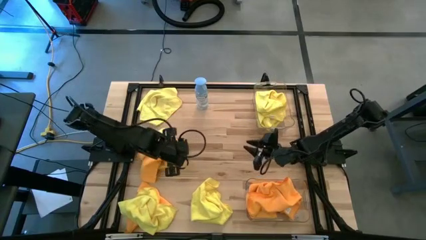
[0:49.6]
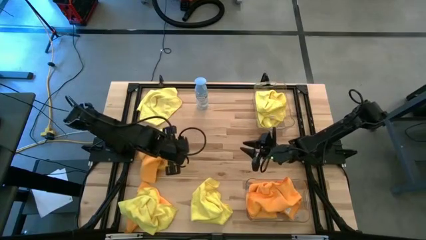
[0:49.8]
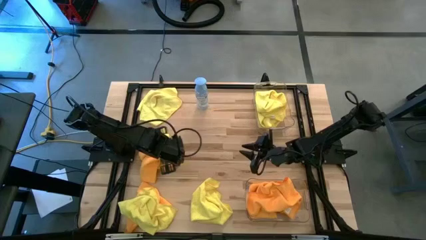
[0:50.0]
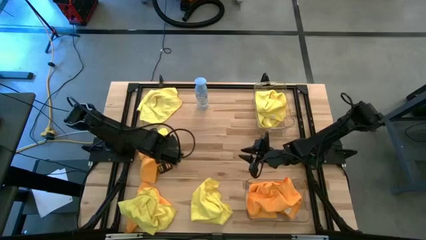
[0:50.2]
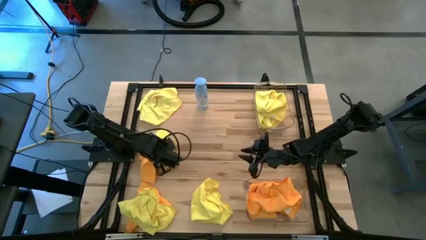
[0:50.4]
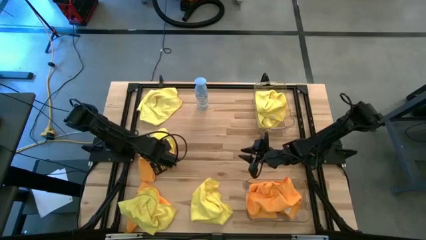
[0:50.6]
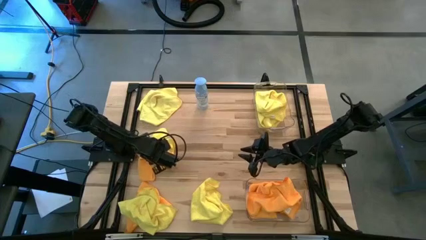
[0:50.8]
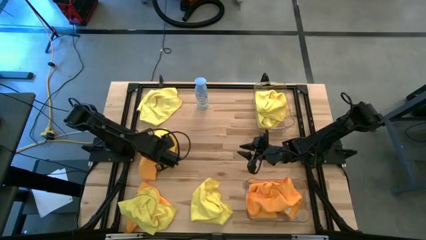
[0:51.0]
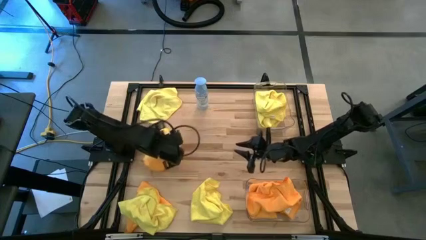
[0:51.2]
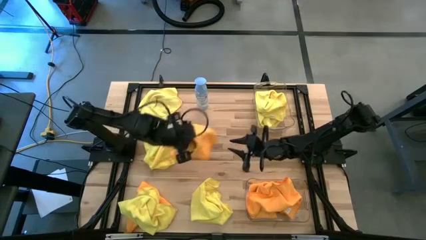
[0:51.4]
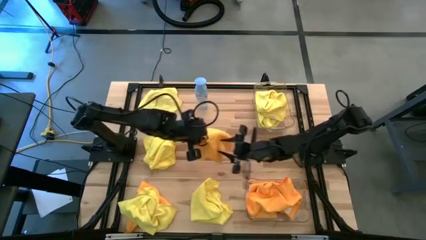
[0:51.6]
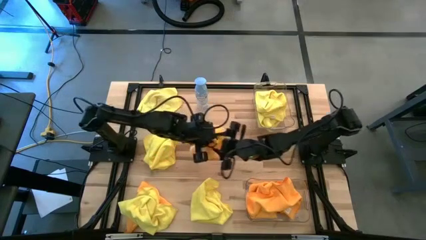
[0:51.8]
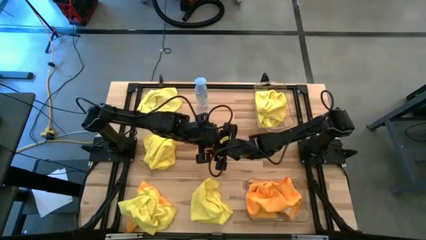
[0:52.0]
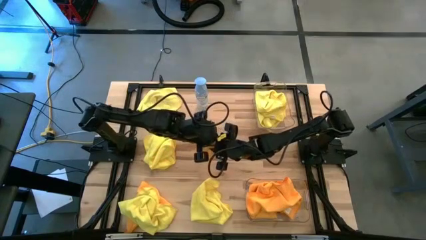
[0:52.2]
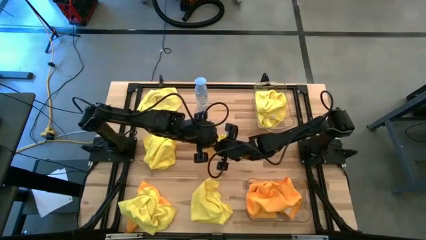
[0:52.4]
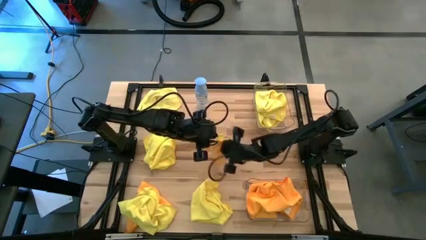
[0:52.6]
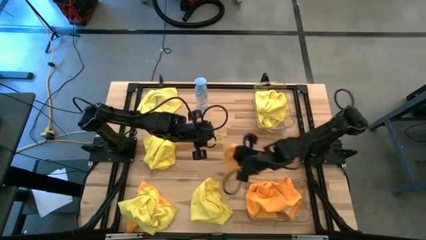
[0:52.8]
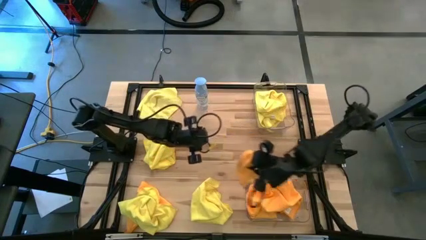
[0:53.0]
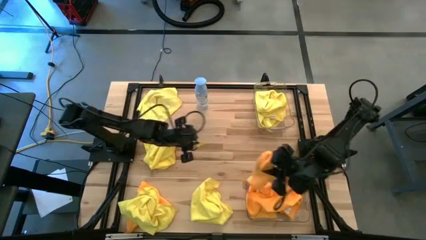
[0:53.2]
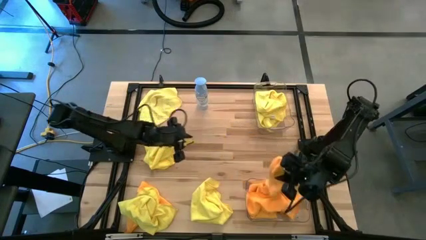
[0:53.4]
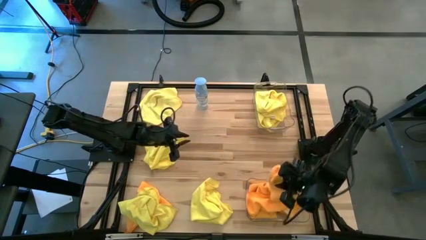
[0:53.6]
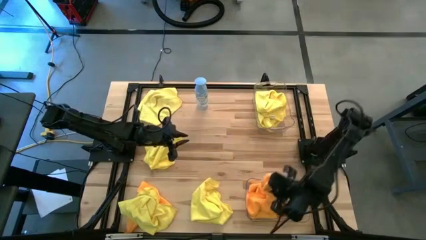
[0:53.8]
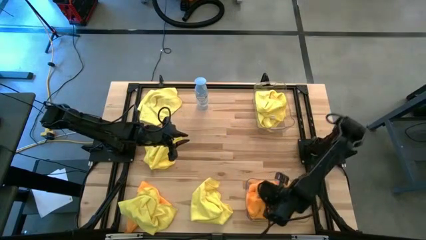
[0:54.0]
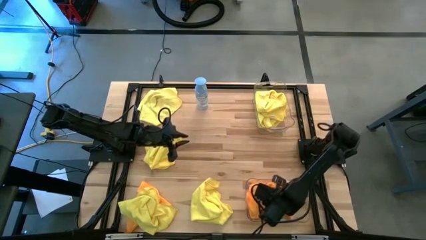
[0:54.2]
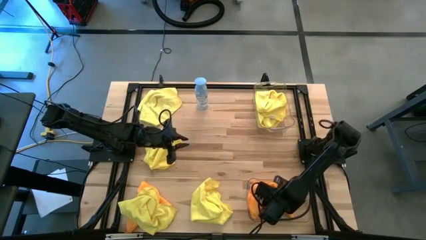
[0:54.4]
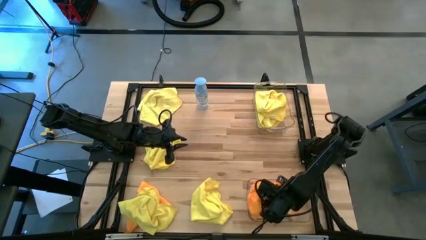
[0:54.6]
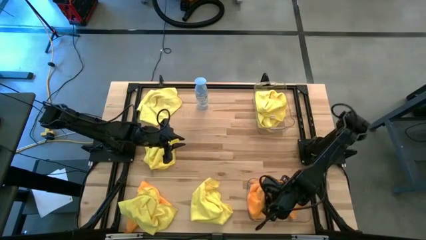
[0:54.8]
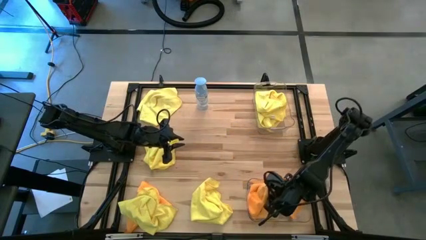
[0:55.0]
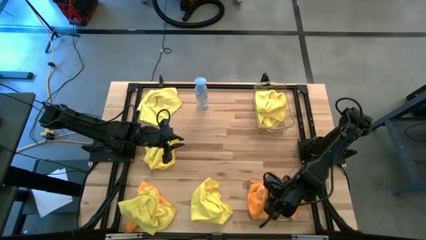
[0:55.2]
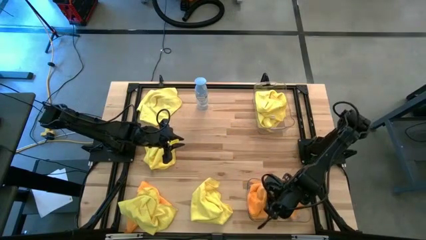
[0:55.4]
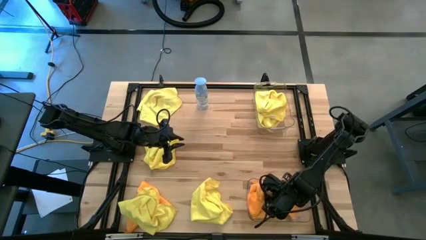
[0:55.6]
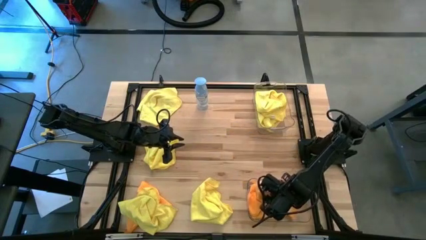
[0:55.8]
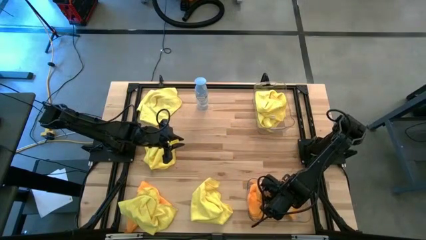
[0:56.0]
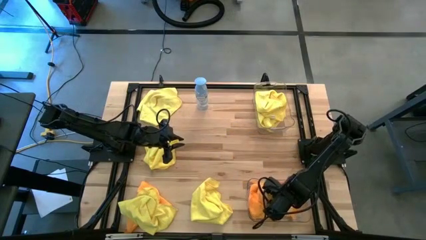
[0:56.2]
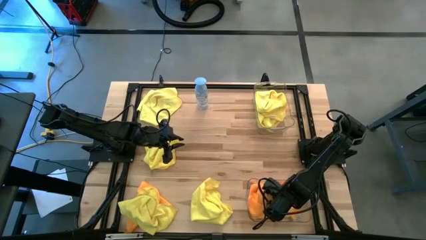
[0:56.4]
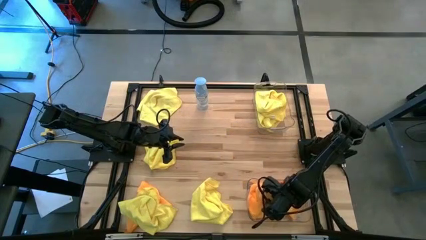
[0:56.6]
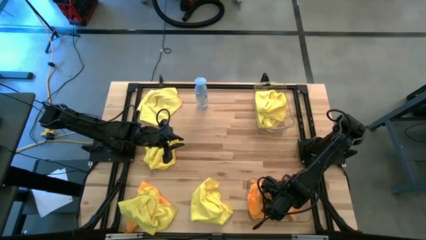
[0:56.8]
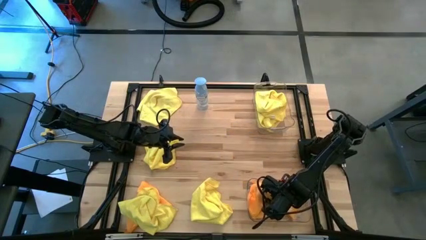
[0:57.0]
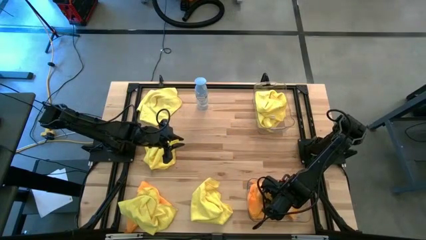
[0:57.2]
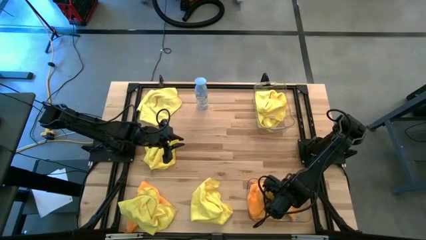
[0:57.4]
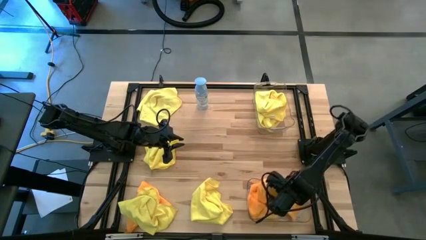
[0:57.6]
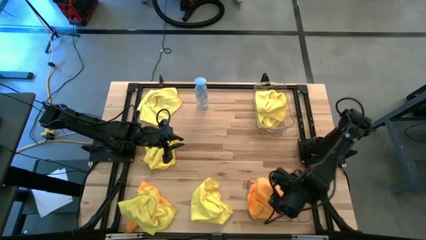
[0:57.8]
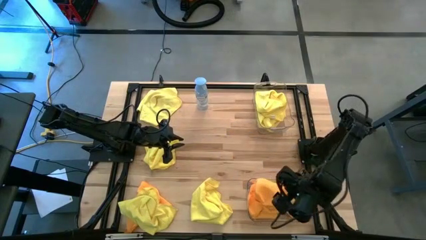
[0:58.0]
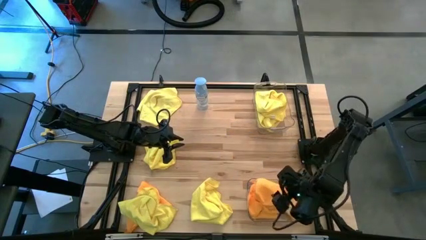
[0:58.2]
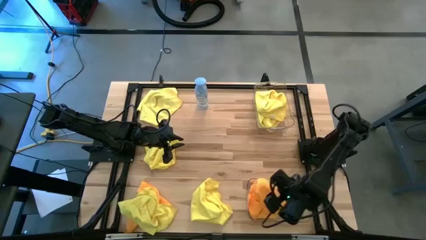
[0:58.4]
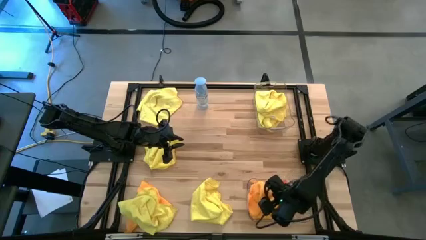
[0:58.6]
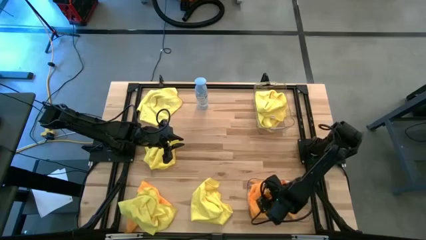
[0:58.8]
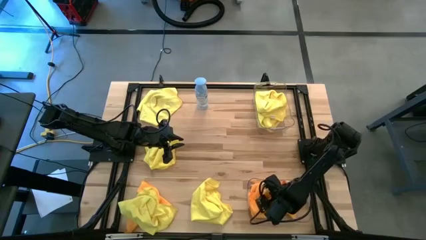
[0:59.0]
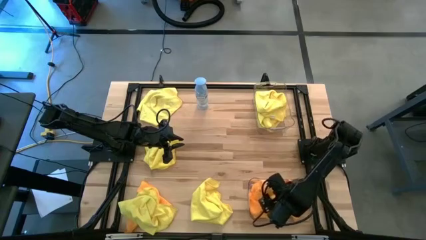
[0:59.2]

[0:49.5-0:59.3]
Task: Sort microfiber towel by color & place in baskets
Put the orange microfiber cloth into the bottom transparent bin

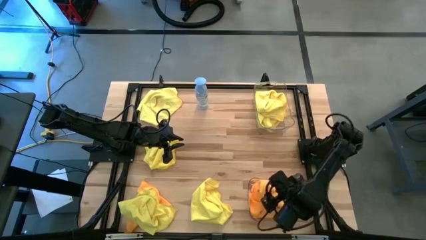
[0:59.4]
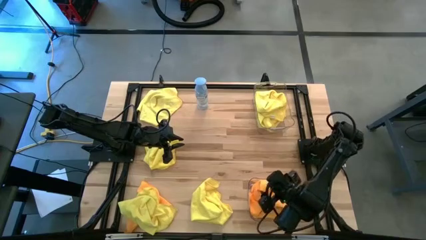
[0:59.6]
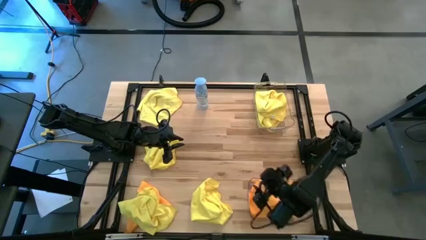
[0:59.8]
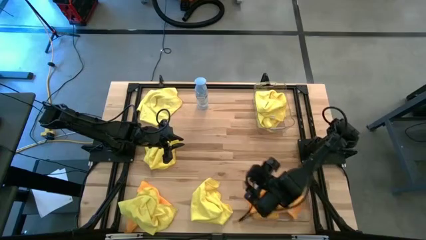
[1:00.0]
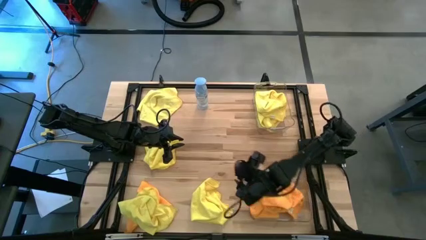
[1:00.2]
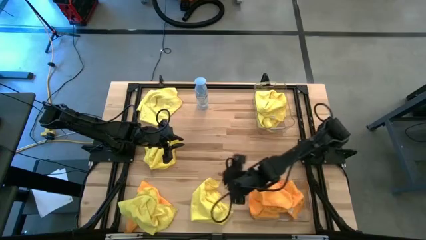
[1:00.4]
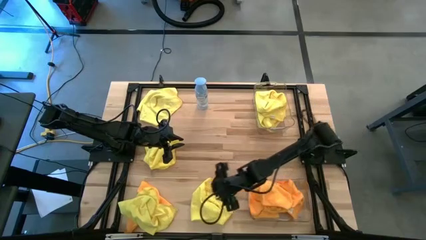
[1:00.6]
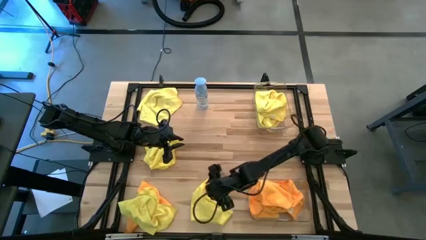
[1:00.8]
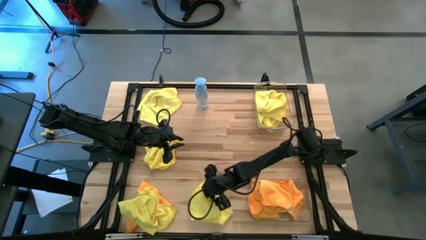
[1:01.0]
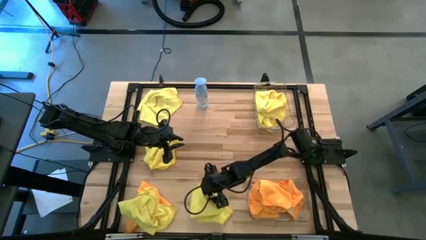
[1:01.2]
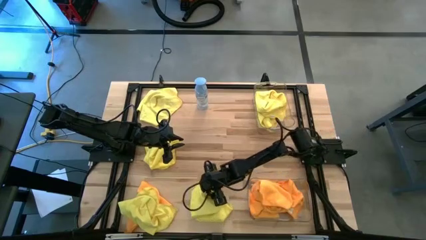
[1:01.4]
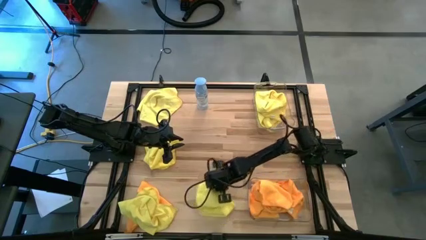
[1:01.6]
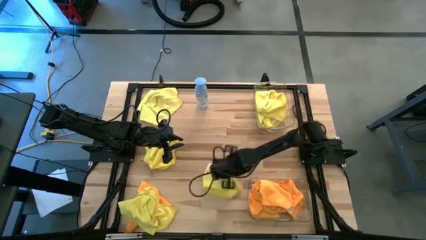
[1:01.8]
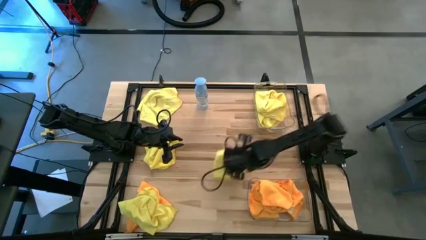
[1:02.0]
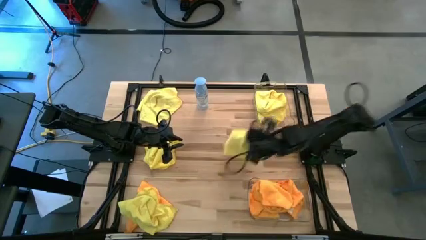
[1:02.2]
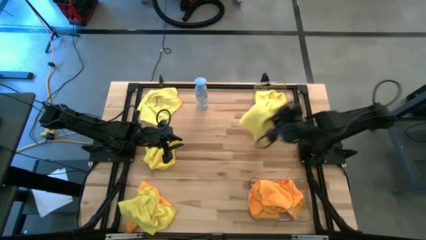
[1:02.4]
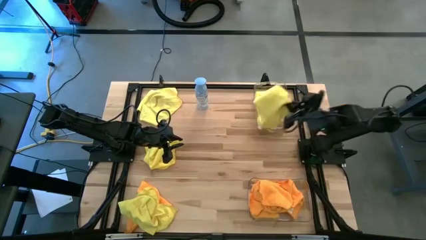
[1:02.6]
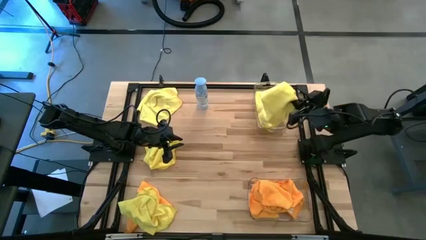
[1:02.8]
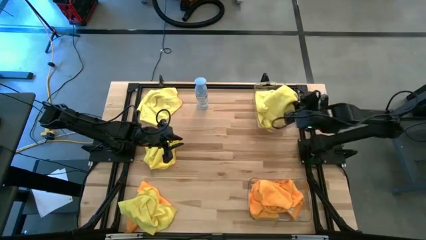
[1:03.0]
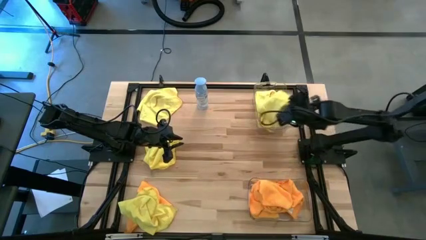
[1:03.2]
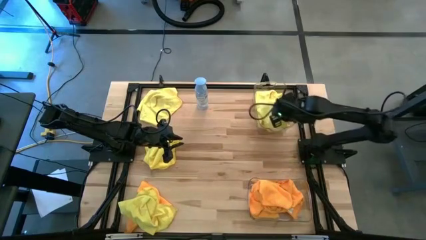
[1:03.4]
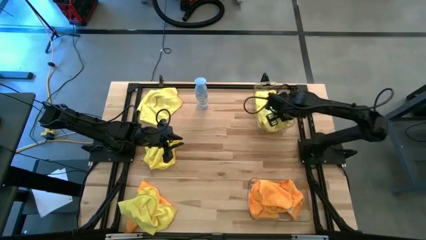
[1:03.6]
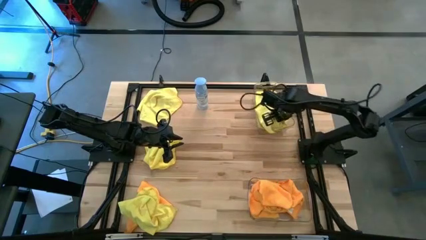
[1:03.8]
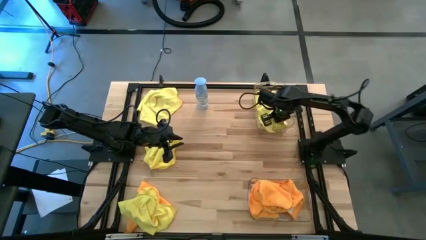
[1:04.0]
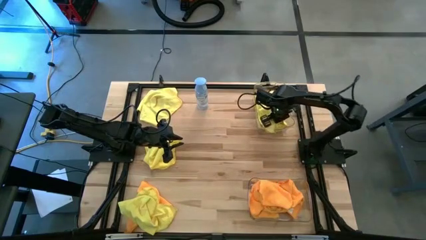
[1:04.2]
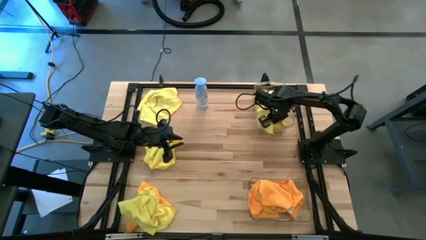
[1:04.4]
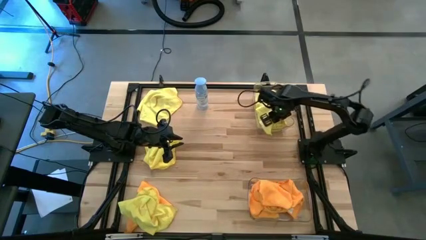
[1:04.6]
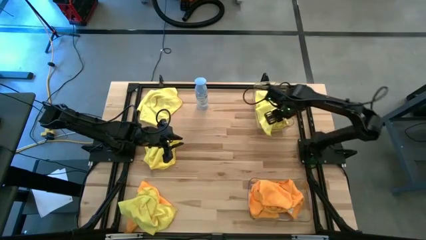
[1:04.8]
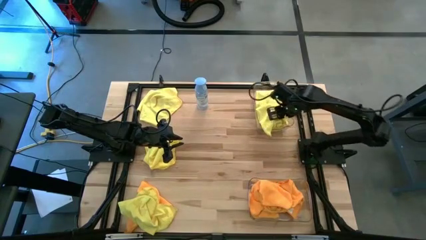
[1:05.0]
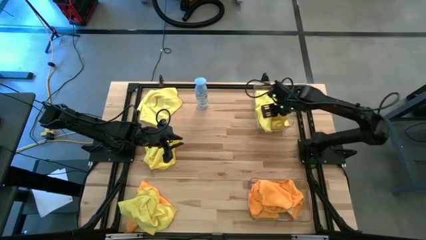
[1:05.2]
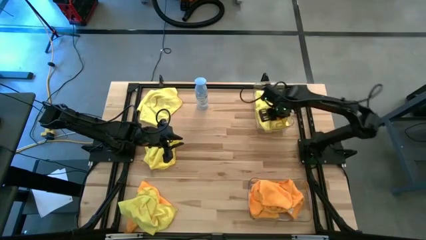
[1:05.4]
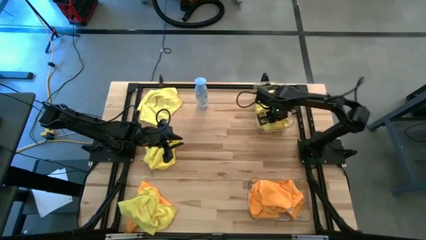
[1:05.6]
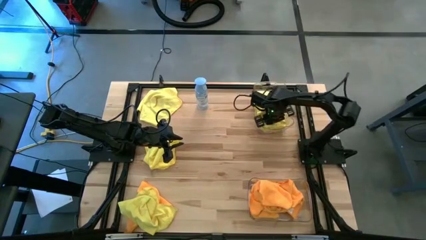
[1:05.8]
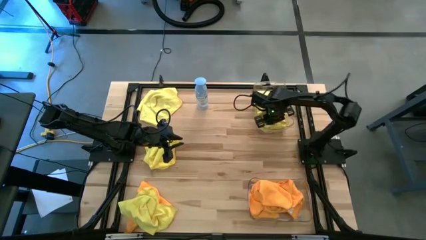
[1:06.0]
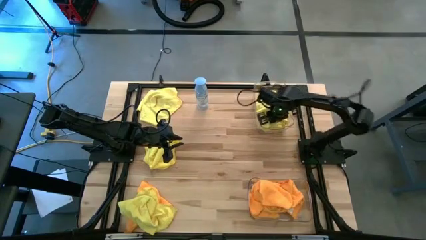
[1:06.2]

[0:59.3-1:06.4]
Put the yellow microfiber cloth into the top transparent bin

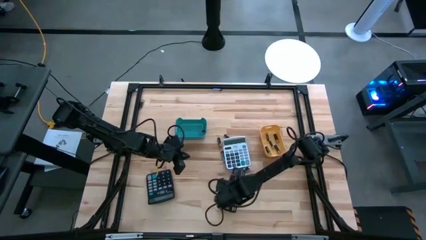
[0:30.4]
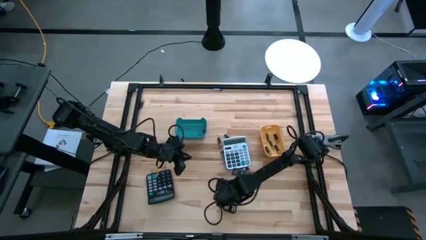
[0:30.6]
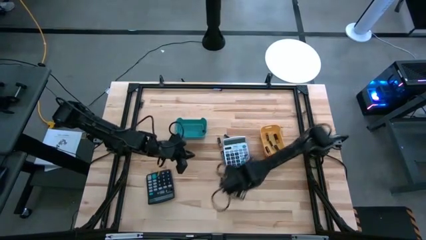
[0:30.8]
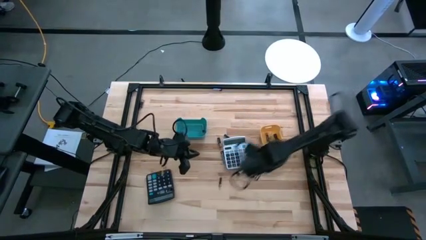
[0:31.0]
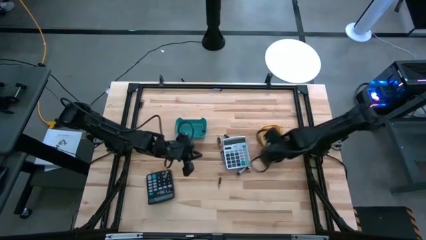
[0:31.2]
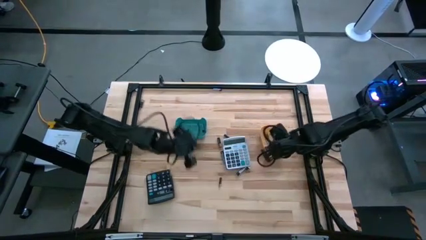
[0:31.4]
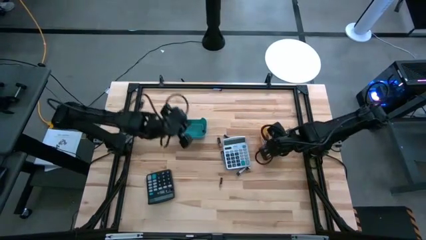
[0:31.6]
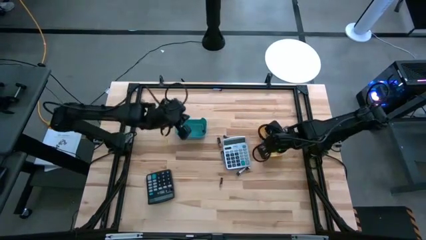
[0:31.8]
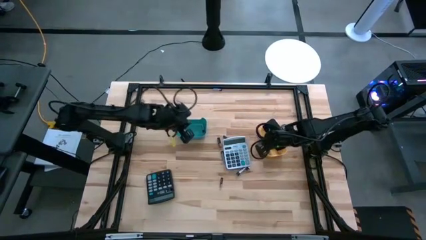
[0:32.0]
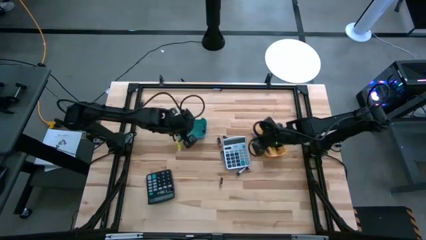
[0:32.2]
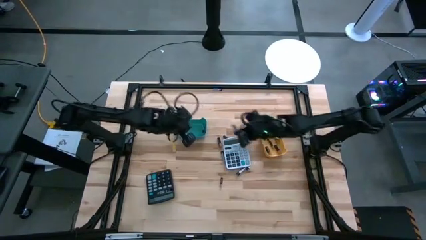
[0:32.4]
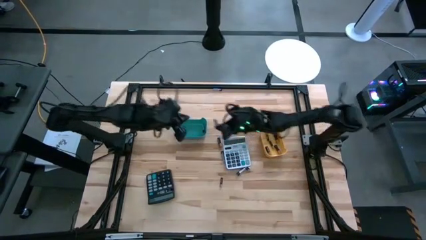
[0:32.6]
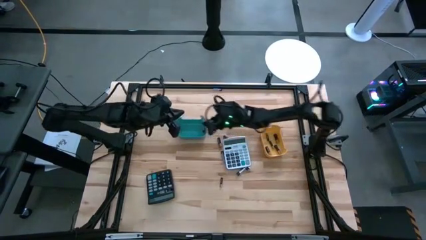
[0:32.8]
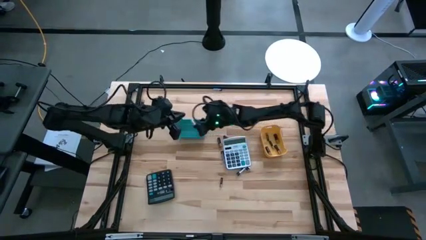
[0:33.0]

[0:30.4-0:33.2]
Task: Sort batteries
Put the silver battery into the yellow bin
